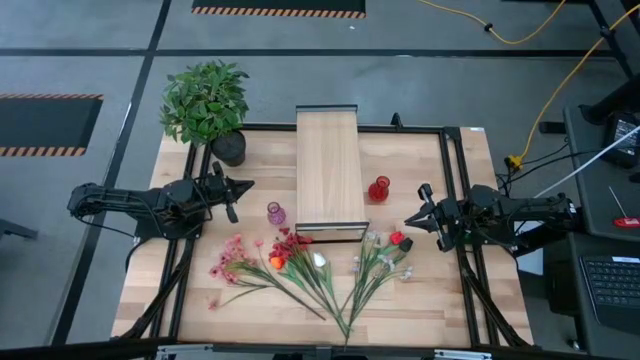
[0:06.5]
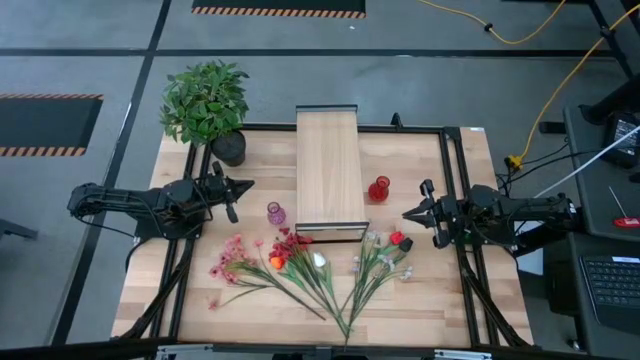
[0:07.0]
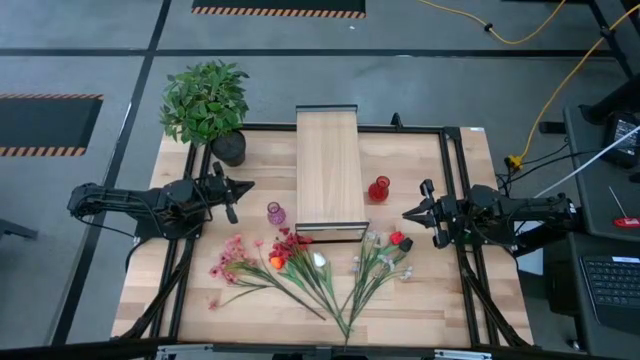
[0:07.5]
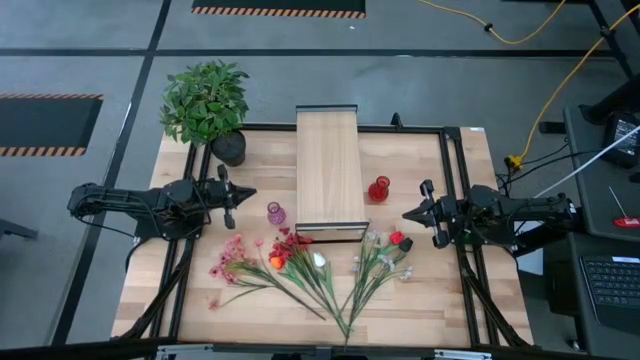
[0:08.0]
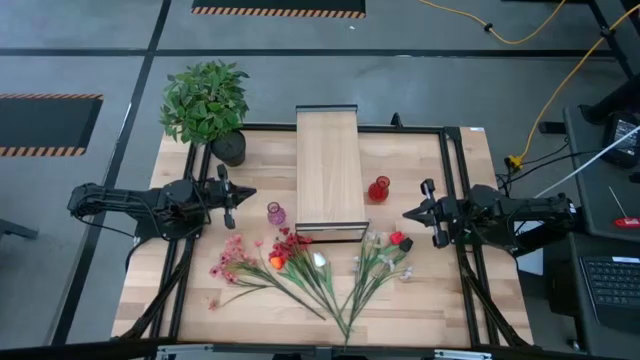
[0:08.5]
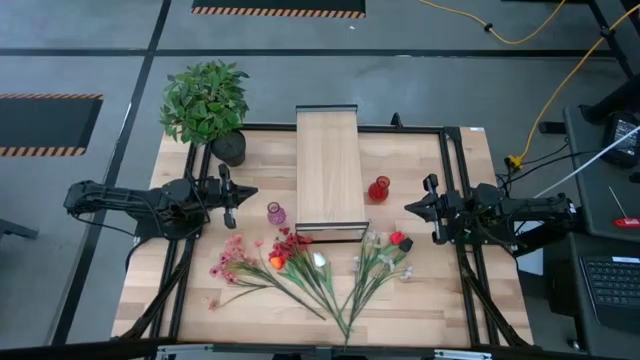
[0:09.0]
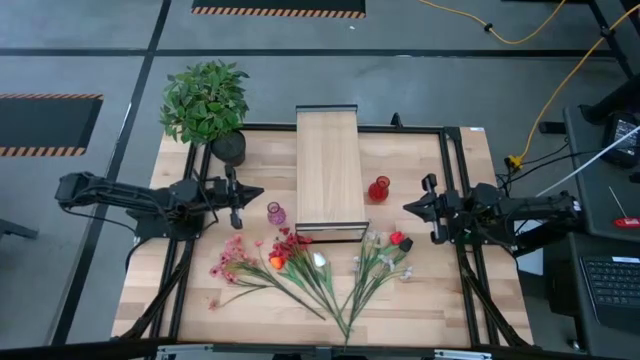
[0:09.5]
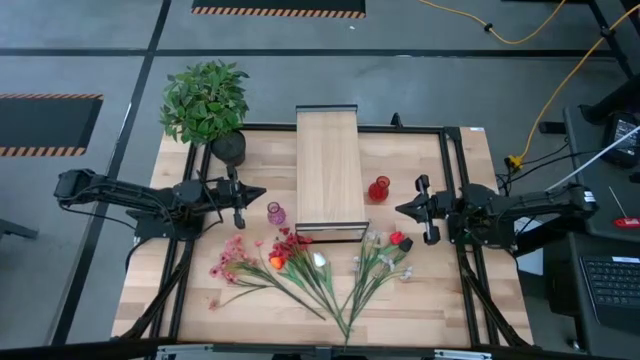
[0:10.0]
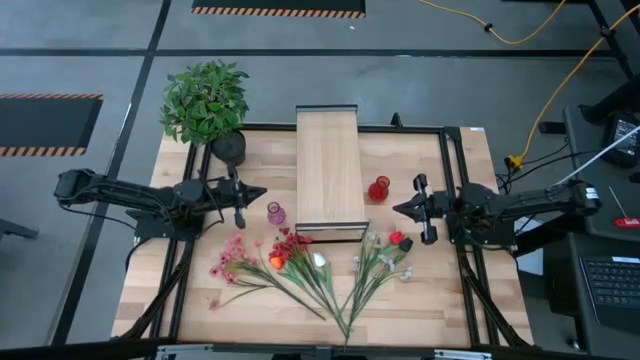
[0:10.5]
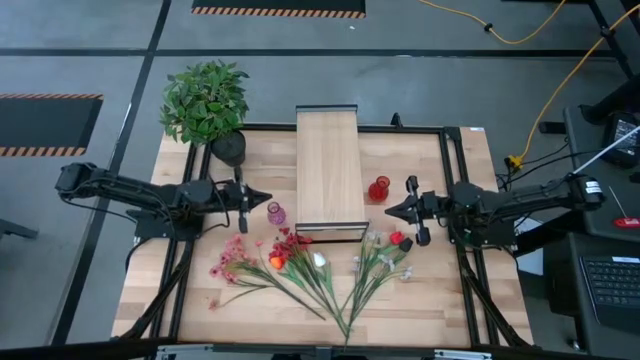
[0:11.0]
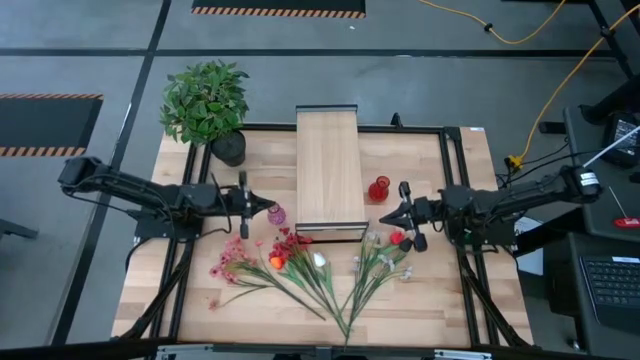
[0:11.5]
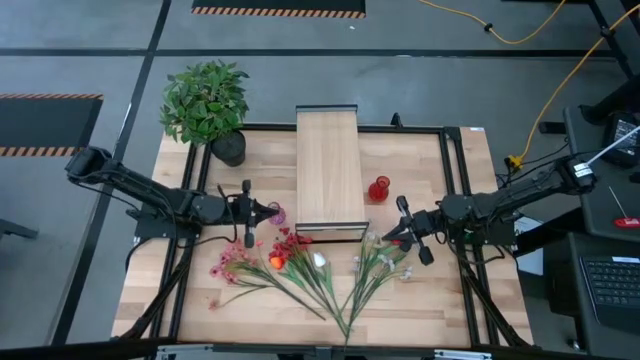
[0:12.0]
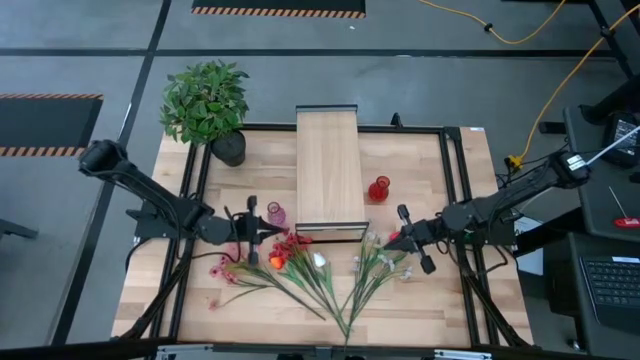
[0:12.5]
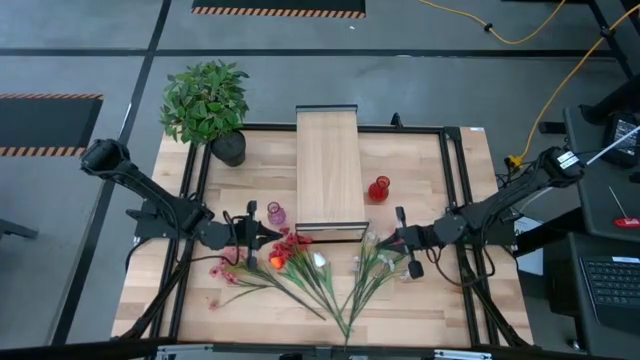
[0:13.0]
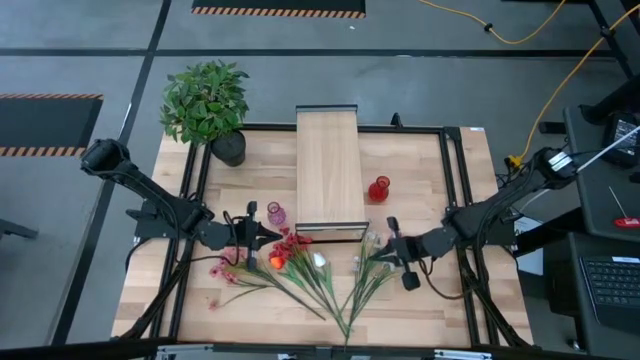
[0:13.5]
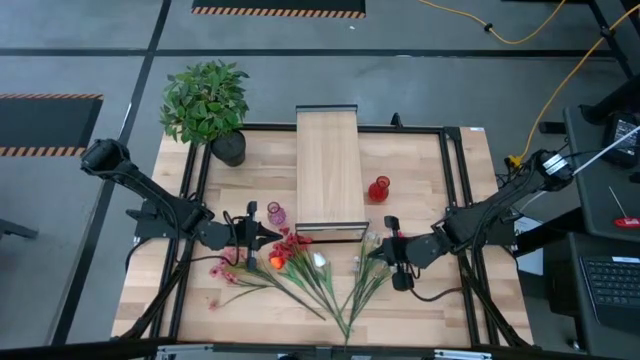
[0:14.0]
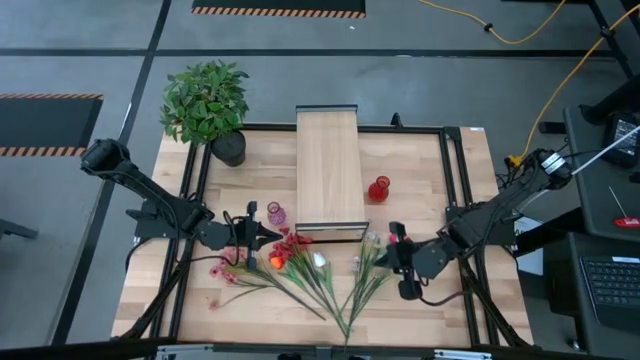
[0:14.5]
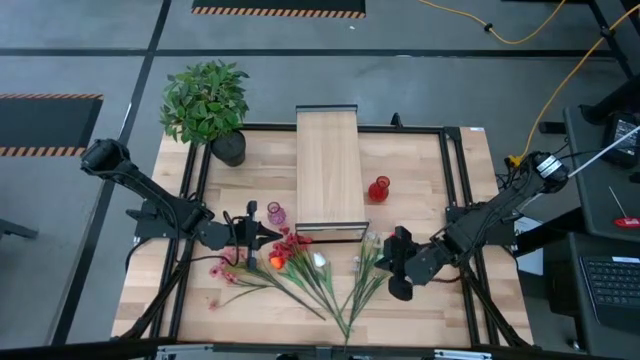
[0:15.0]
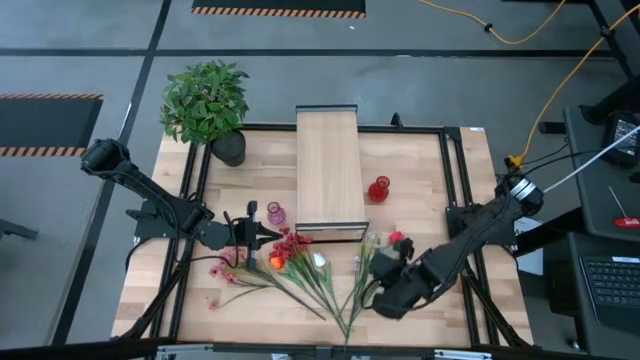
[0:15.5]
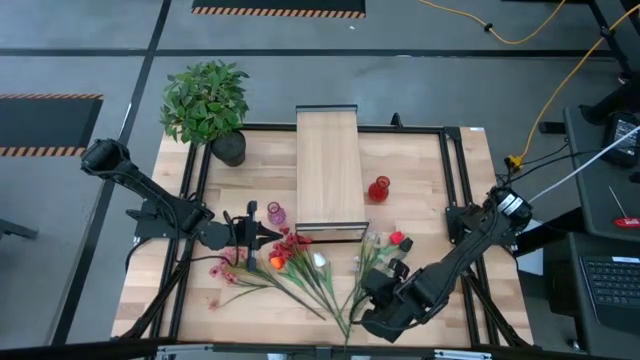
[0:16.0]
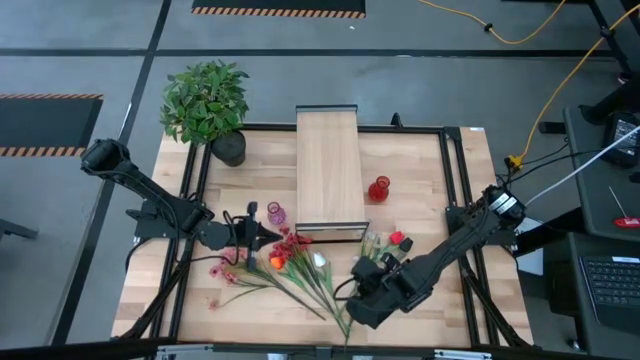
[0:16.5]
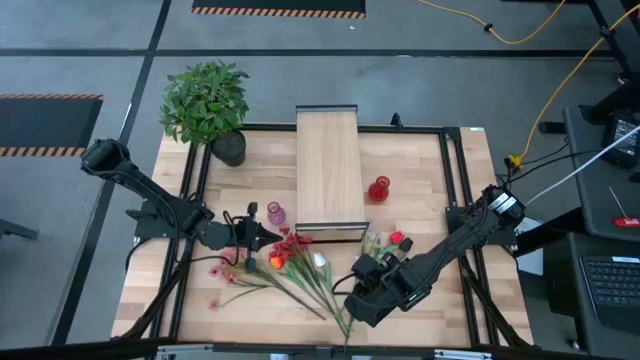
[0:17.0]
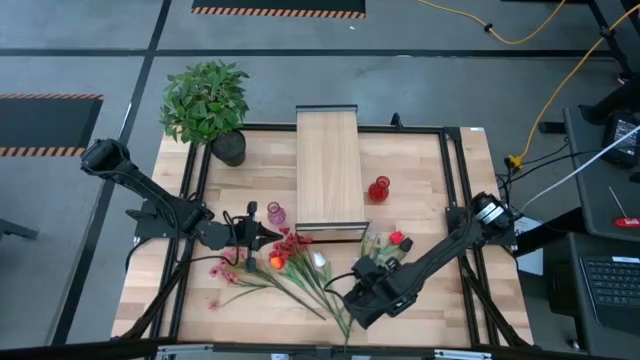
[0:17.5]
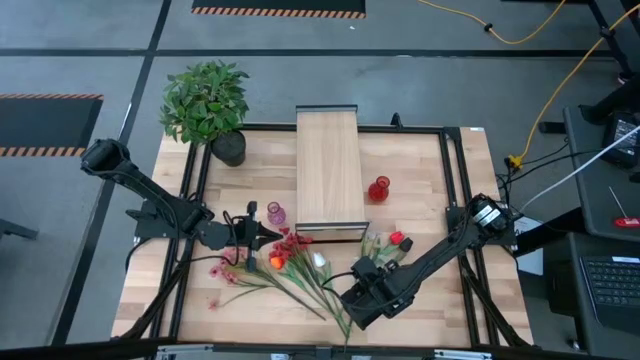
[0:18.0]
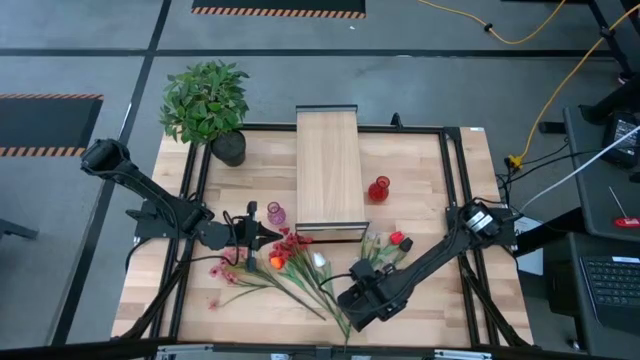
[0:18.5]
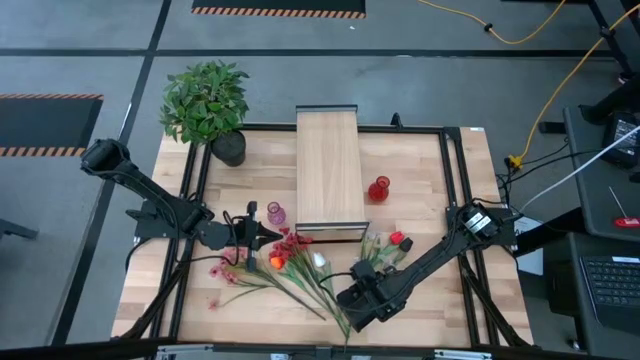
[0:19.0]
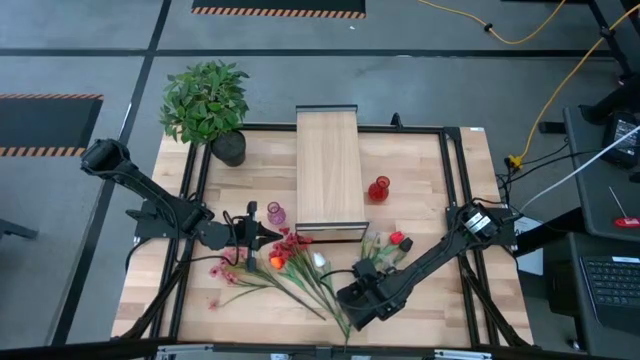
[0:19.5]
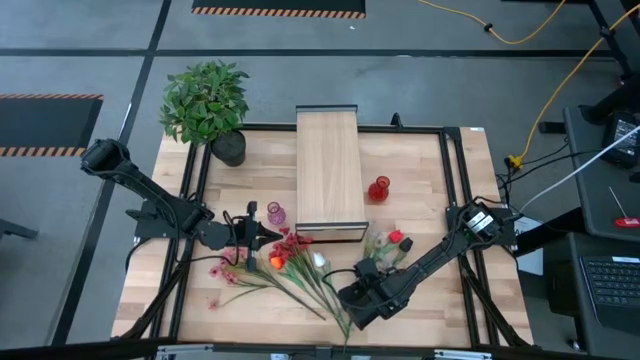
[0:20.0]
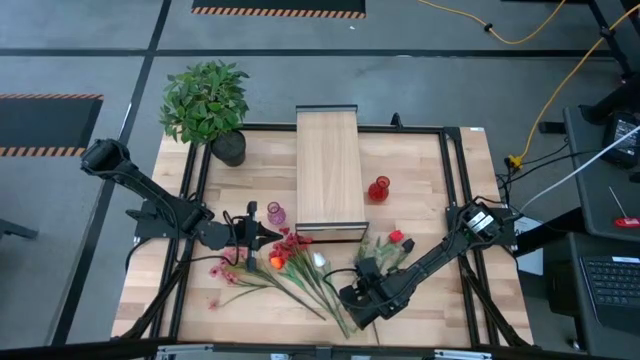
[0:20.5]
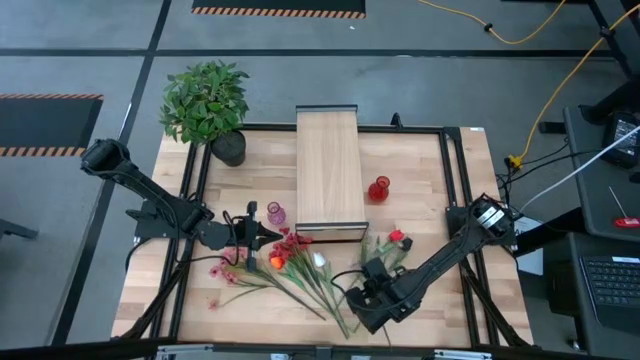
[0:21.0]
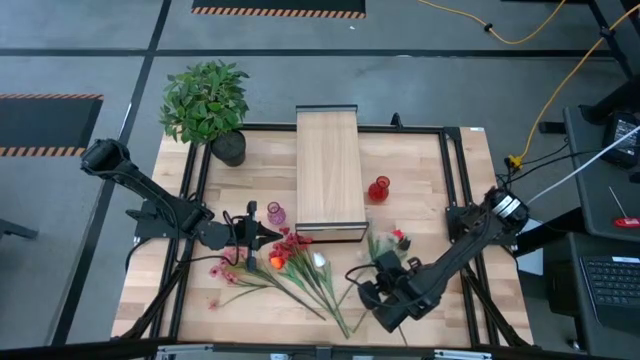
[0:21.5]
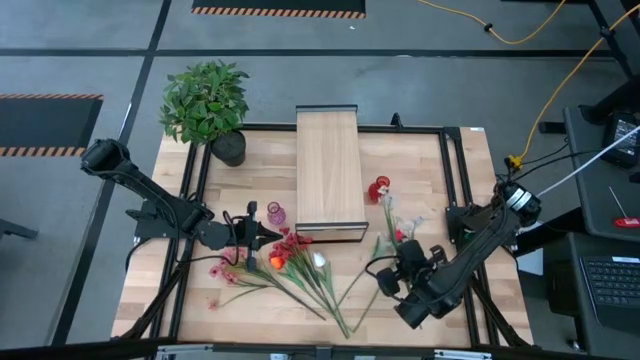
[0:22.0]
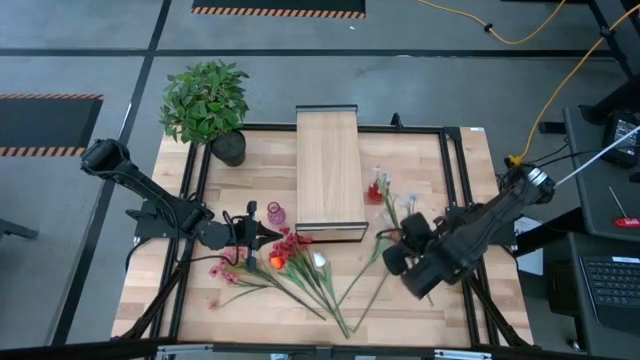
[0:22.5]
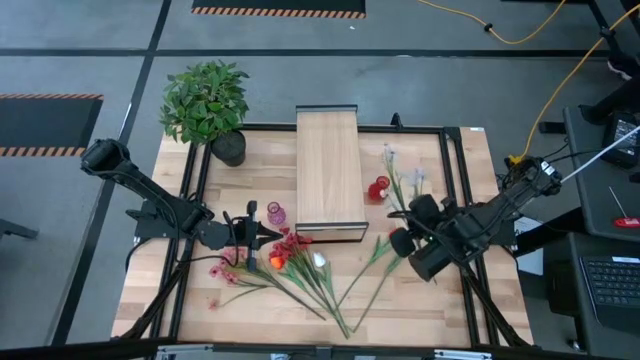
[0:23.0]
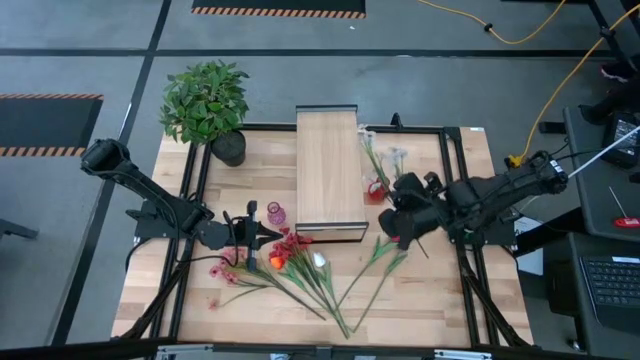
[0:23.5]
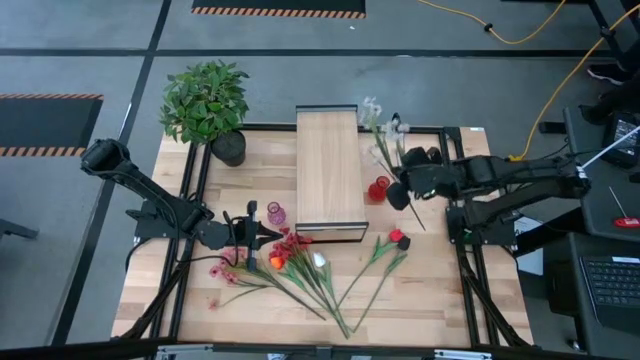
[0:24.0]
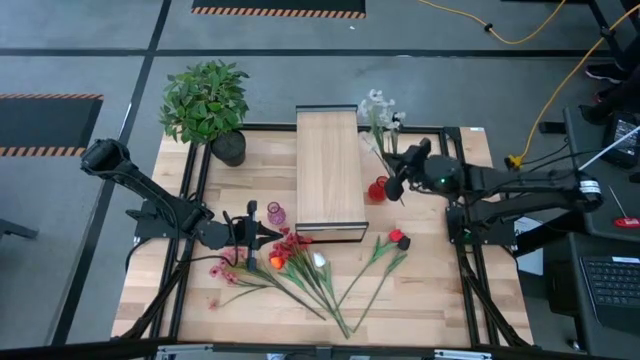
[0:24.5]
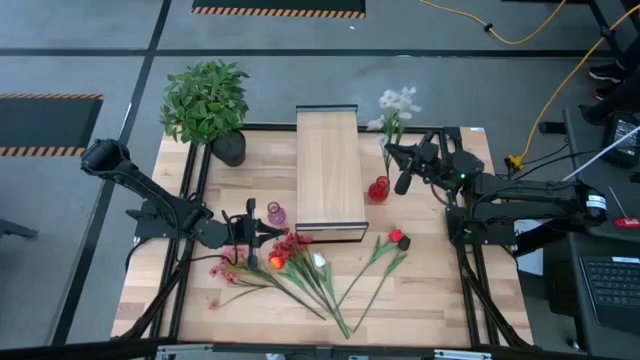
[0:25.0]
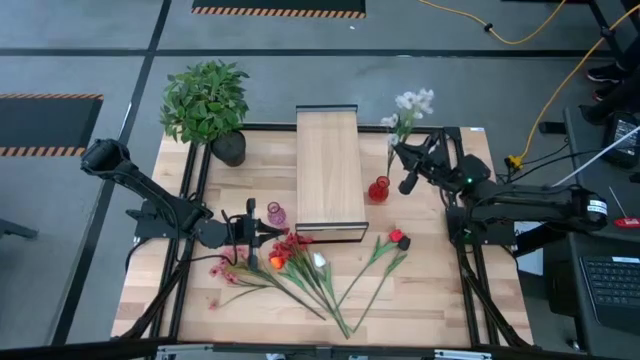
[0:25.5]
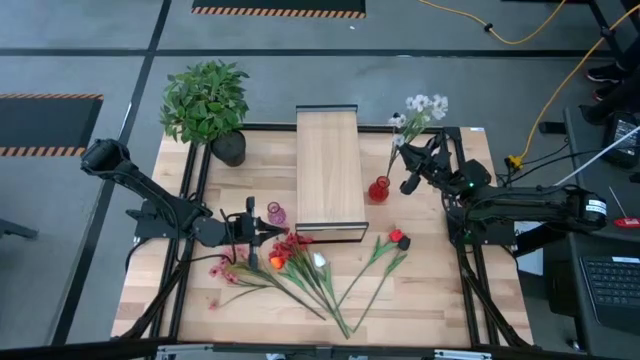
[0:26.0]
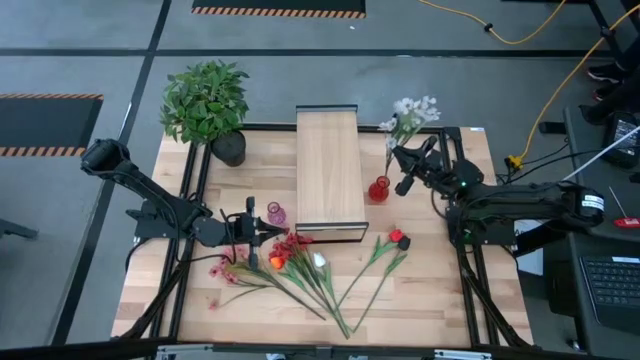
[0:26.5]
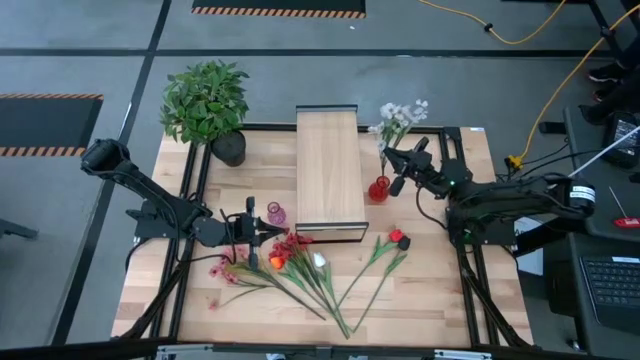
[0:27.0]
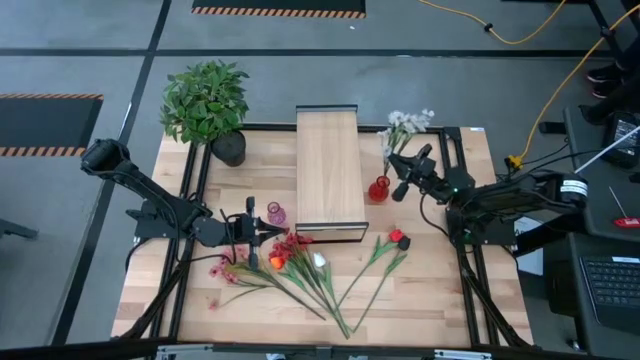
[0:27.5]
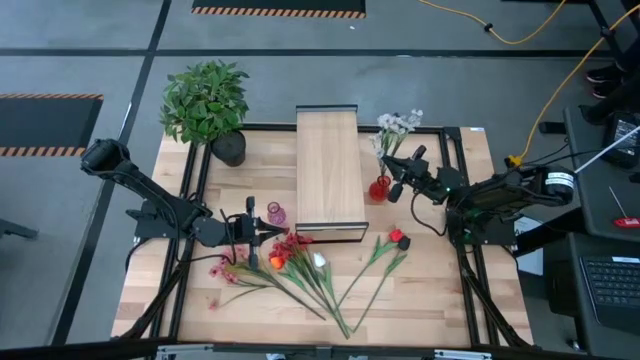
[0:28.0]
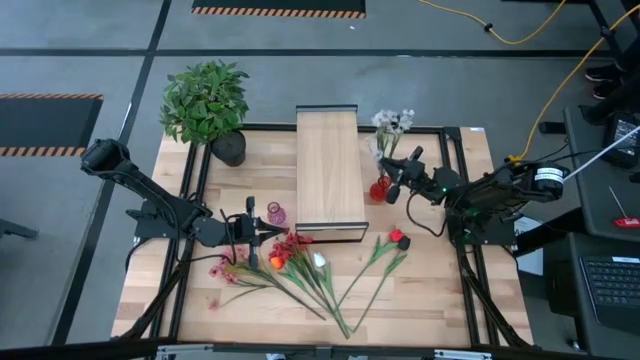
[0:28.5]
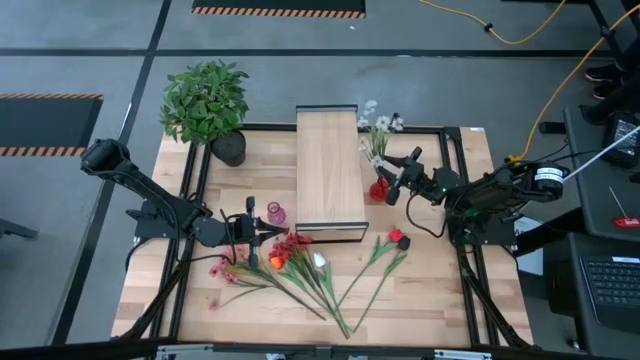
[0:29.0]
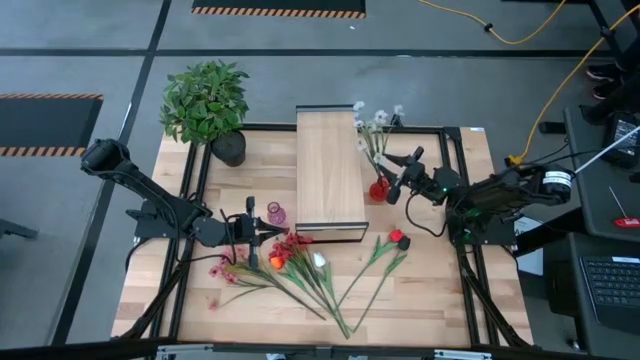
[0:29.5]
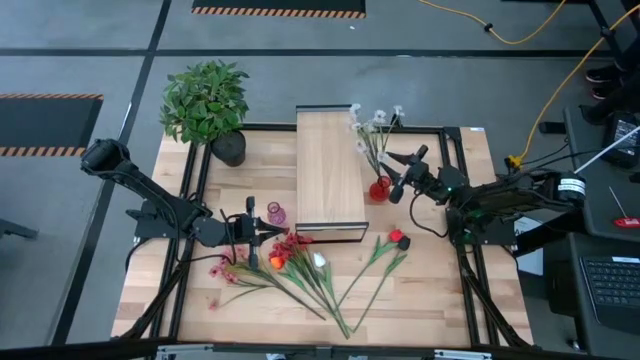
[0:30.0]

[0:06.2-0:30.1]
Task: Pick and place flowers into a vace then onto a shelf
Put the white flowers into the red vase
